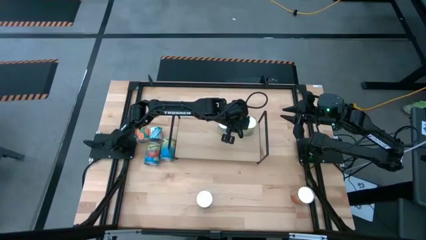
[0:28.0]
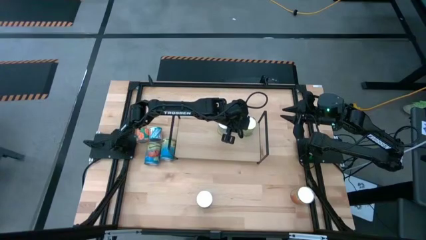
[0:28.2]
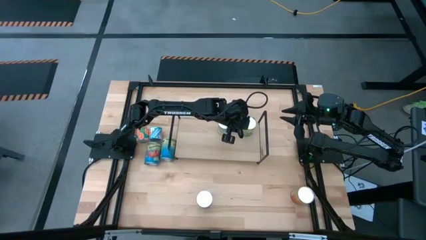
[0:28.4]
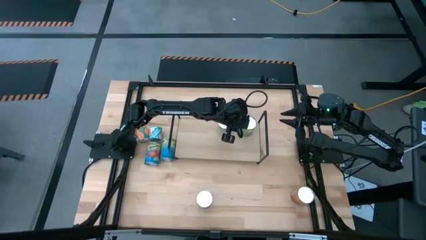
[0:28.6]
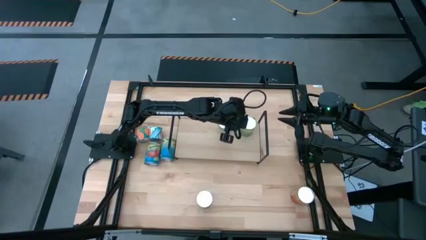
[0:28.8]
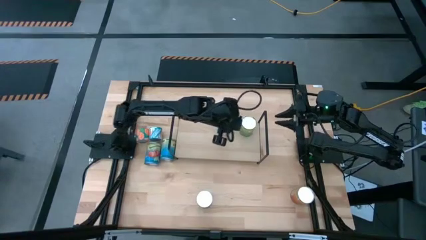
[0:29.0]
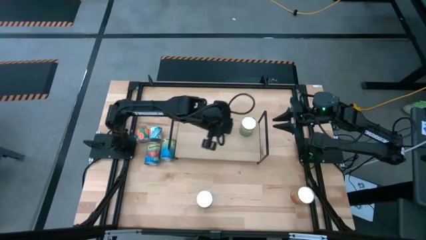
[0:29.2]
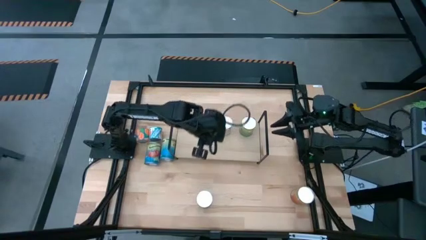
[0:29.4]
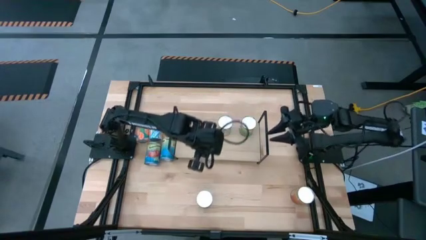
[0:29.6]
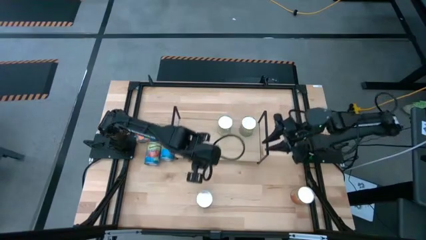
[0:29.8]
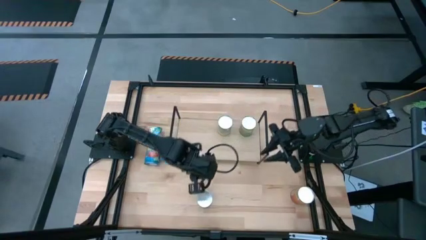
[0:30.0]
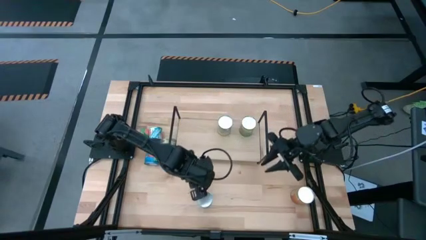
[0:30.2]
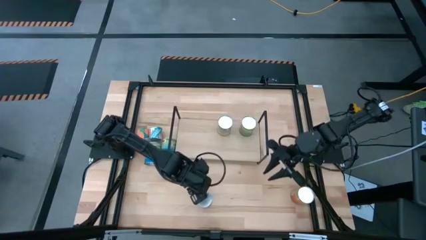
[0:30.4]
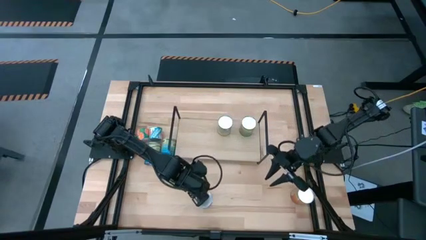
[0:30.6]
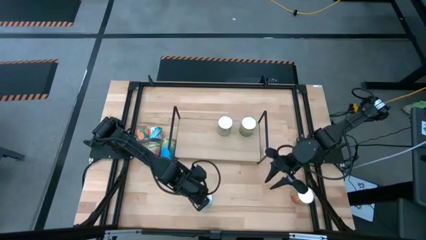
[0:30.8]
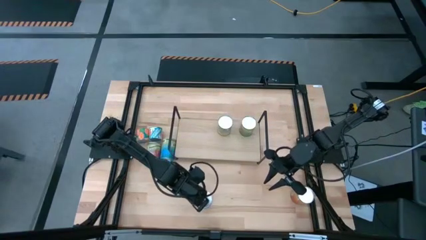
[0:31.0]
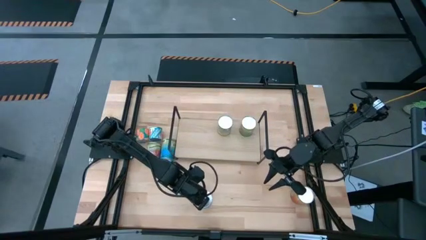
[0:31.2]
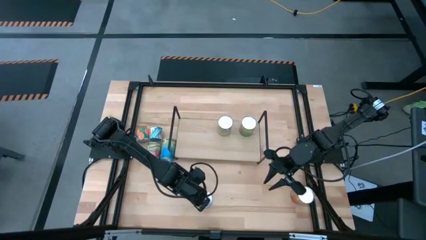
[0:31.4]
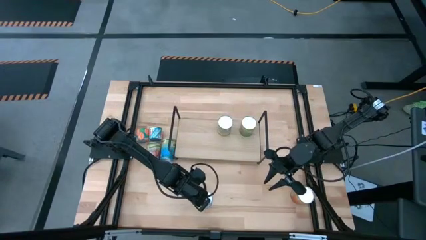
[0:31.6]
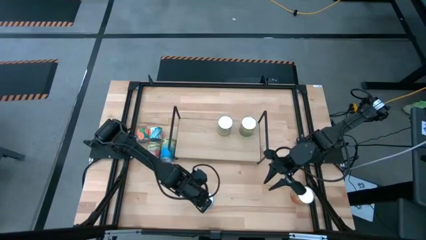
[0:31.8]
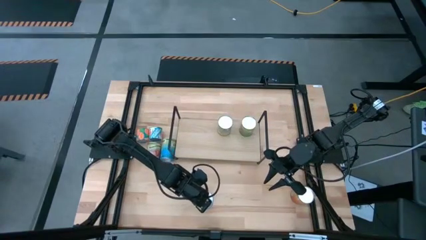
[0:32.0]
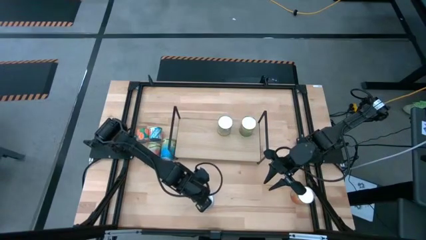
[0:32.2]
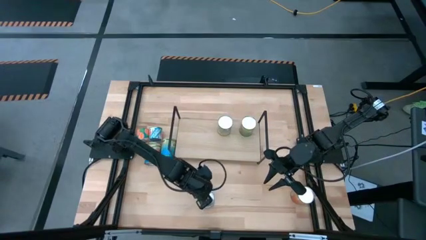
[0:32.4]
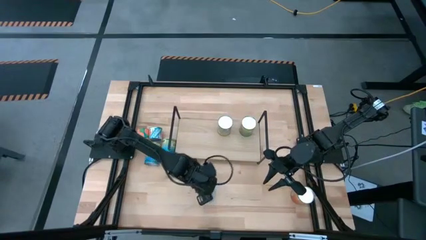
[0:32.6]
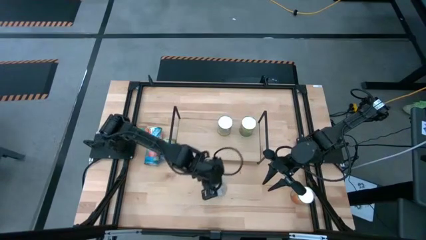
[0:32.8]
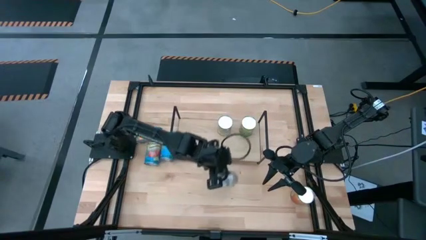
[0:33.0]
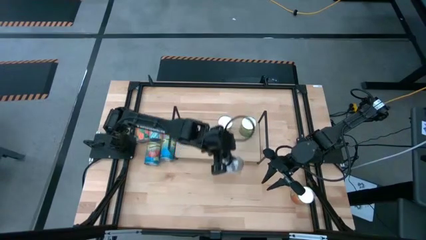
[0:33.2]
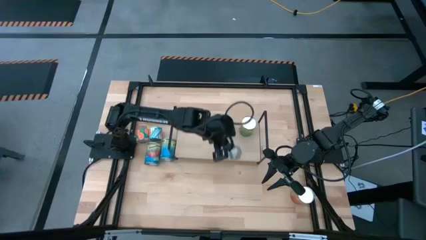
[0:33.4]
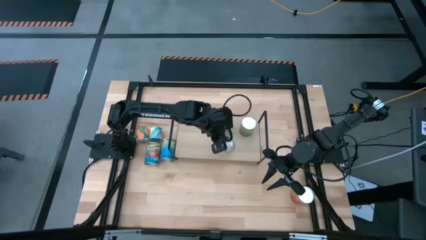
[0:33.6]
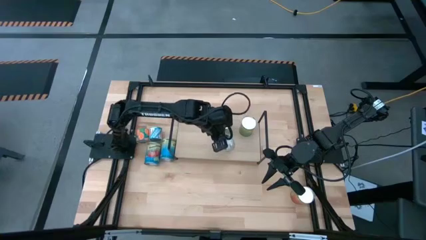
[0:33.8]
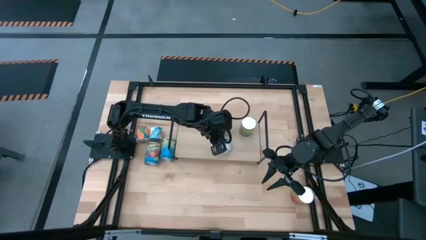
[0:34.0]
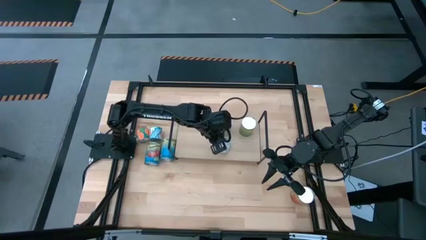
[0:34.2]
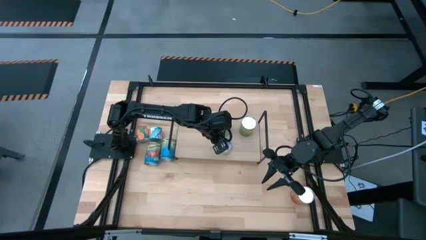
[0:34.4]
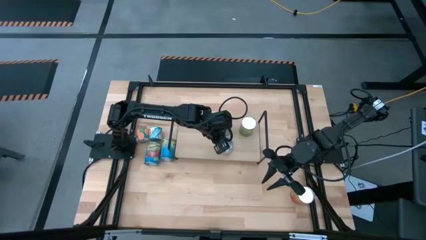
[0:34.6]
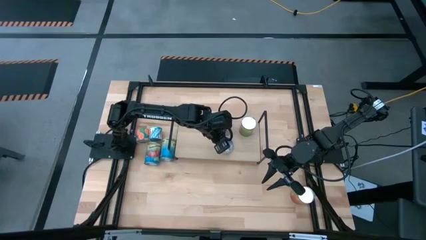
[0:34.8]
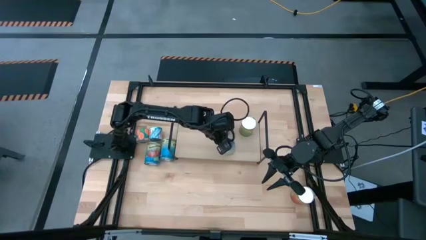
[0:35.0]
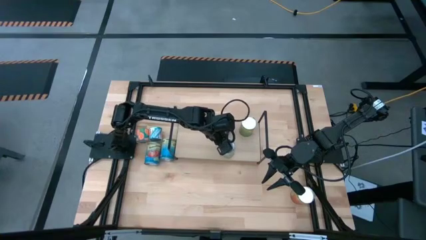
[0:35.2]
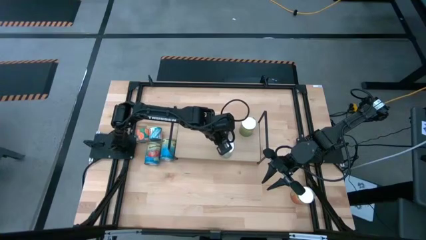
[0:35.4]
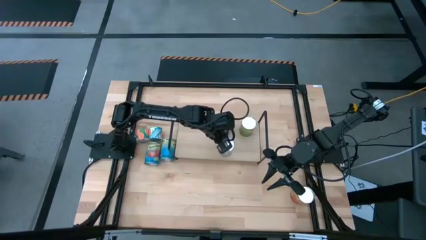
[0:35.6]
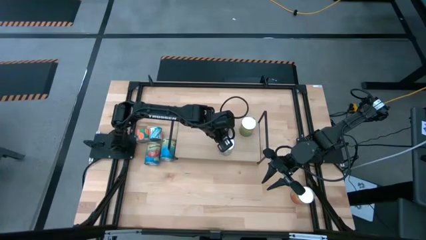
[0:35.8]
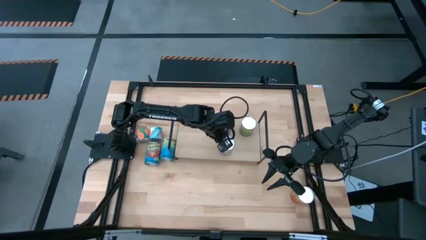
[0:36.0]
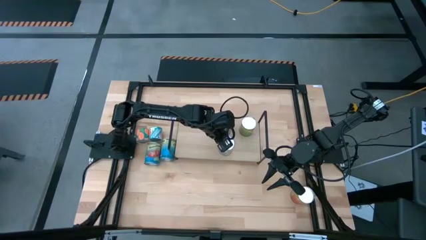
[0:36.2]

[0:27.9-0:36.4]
Task: Pick and place cans onto a shelf
Put the canned peaches on the shelf

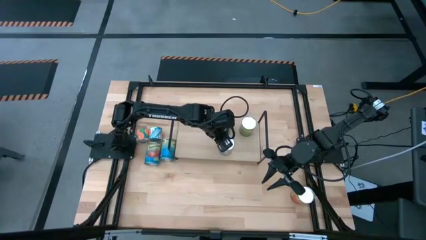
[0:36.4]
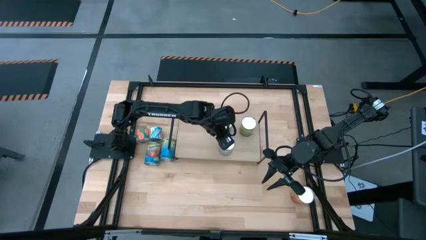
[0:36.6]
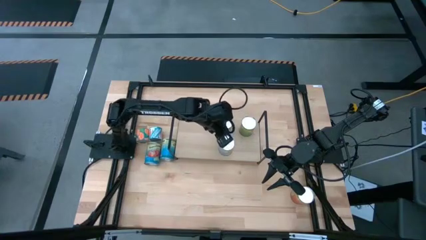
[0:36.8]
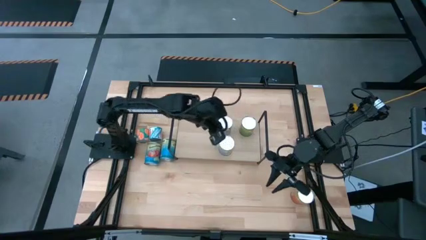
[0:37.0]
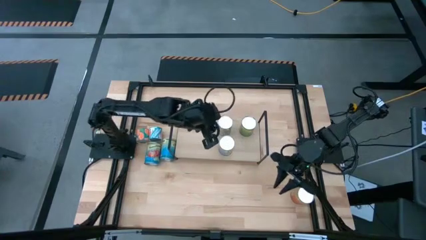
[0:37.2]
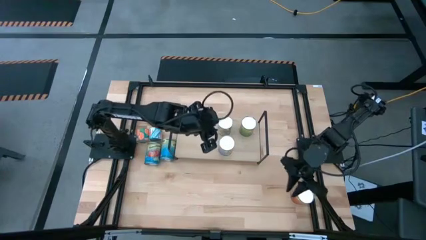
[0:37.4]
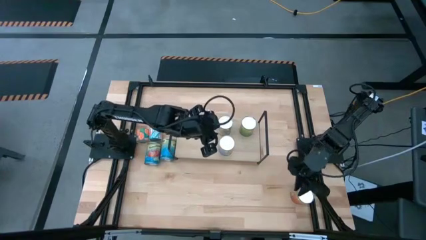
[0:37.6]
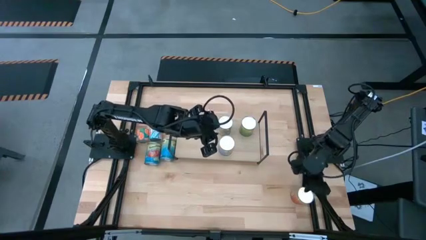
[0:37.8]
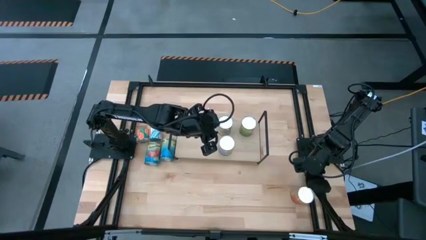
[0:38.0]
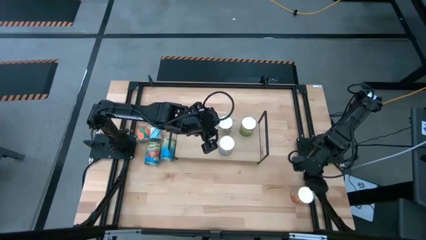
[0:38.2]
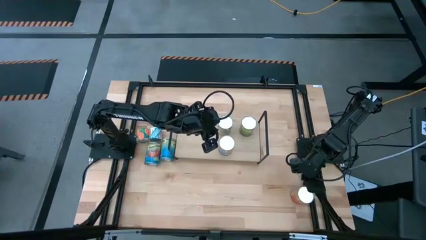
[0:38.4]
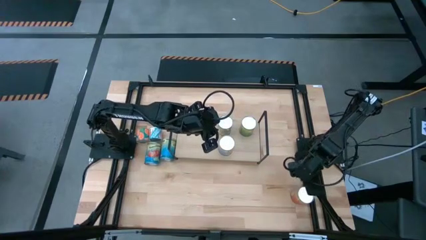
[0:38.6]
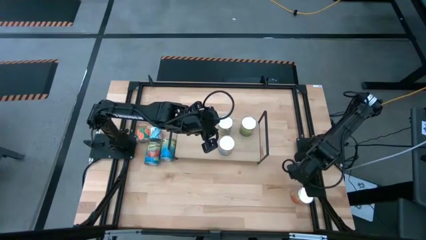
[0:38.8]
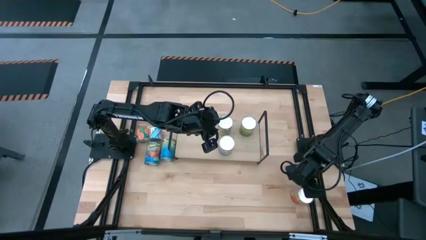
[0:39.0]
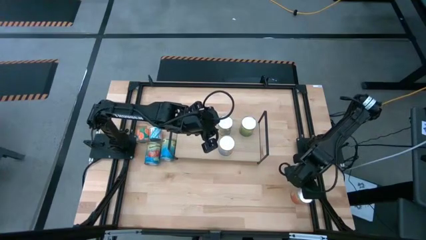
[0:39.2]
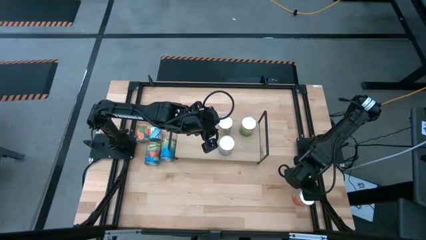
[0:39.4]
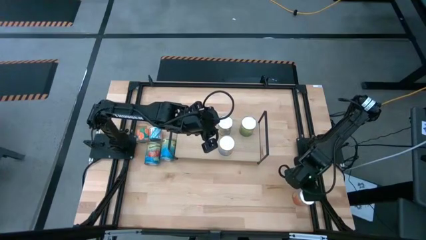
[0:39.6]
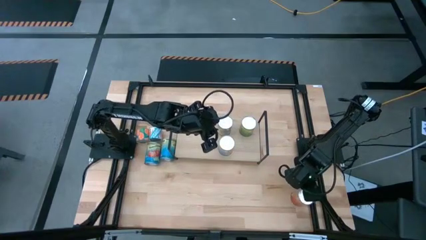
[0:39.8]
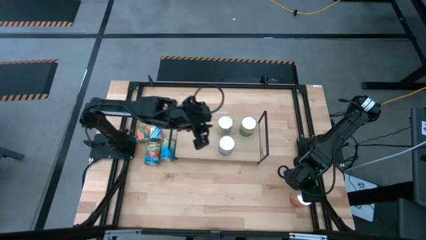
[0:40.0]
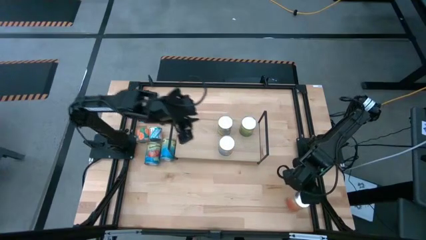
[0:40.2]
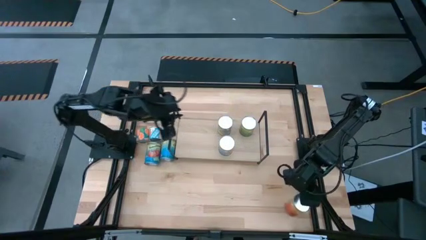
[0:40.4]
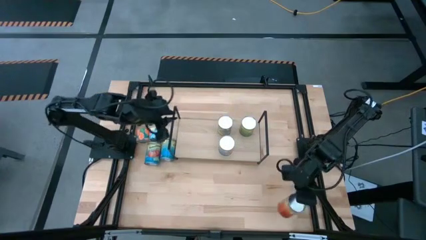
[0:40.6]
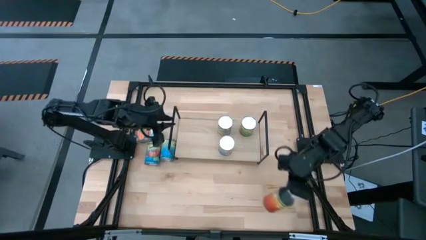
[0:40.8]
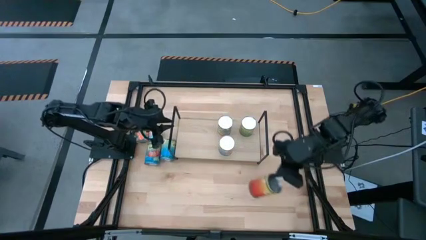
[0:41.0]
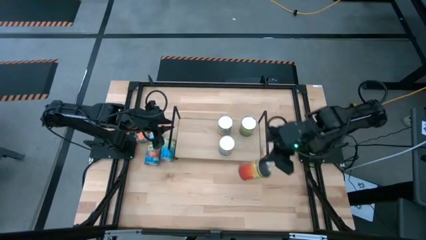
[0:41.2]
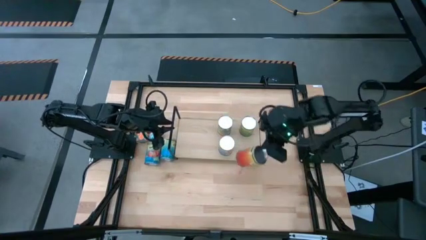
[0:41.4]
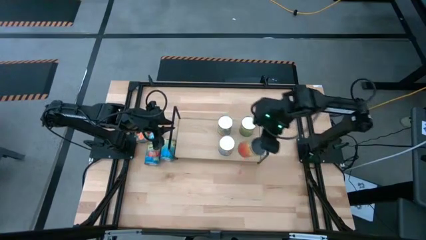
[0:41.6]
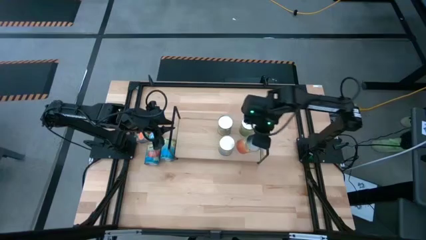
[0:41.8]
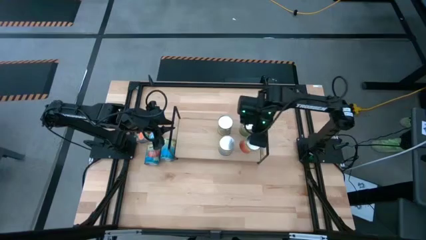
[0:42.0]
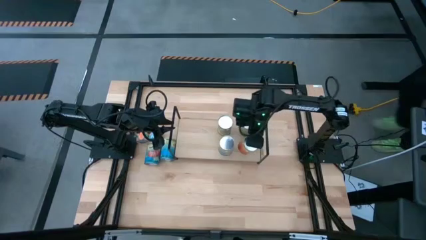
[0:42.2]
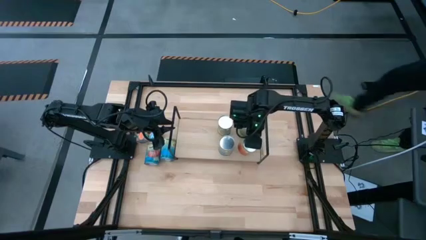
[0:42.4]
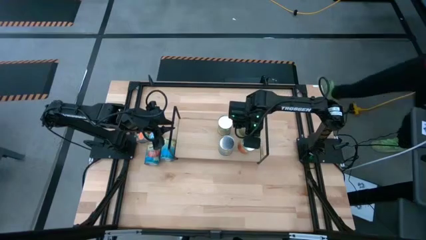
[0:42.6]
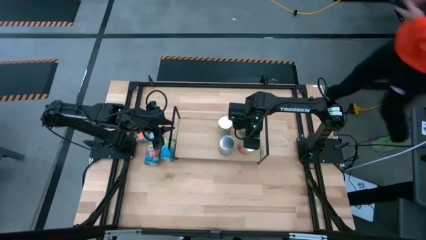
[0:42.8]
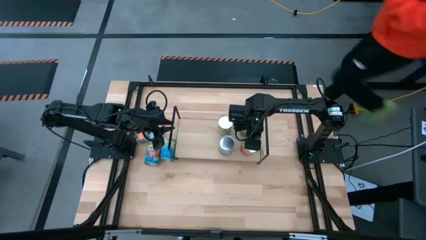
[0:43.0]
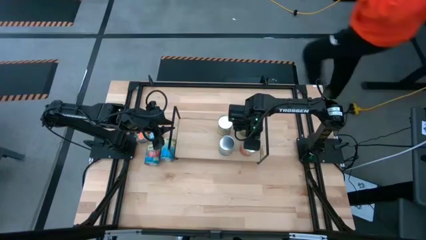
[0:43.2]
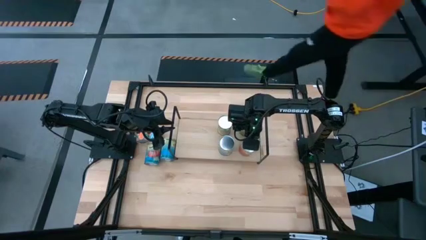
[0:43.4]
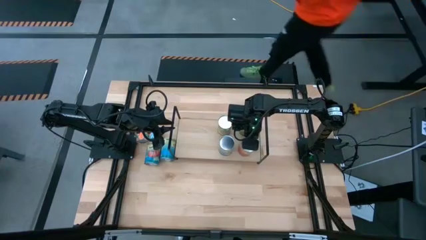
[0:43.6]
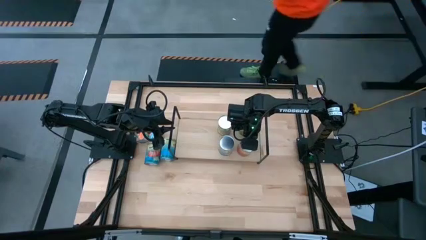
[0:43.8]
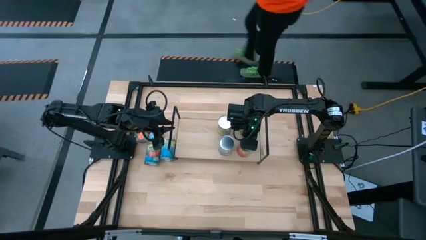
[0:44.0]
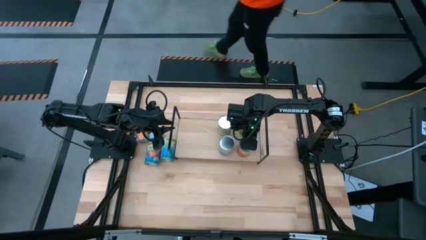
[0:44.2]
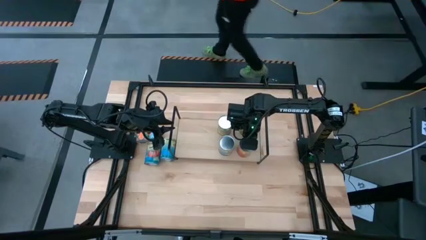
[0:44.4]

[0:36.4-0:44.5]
Put the canned pineapple on the shelf
